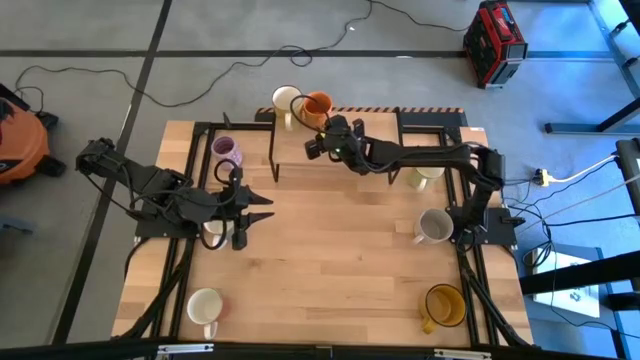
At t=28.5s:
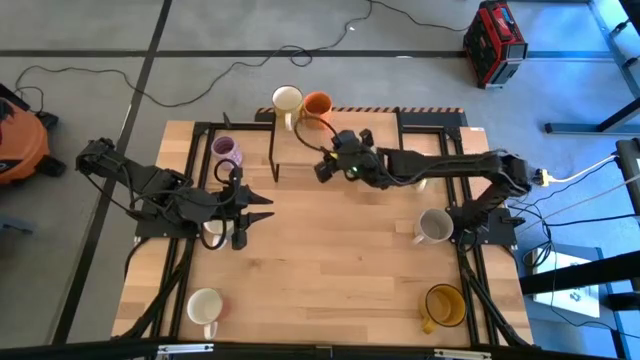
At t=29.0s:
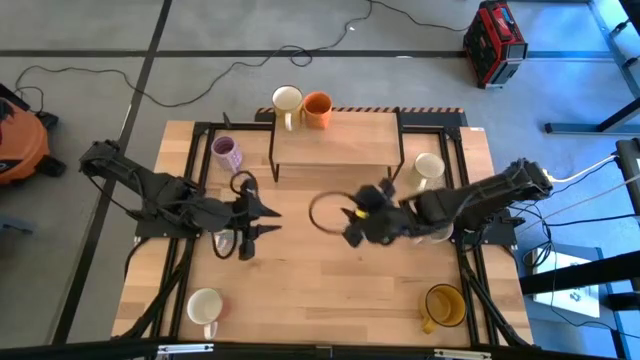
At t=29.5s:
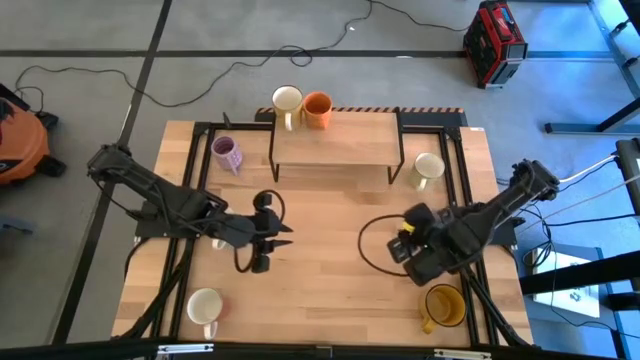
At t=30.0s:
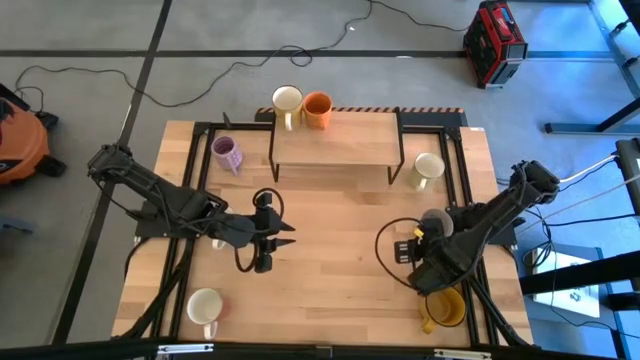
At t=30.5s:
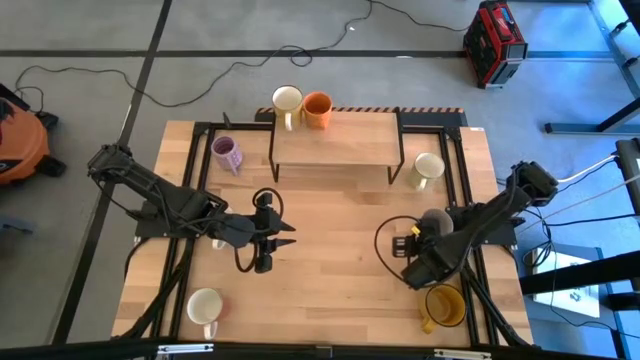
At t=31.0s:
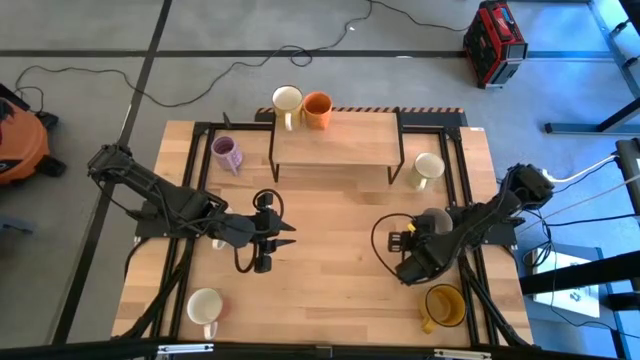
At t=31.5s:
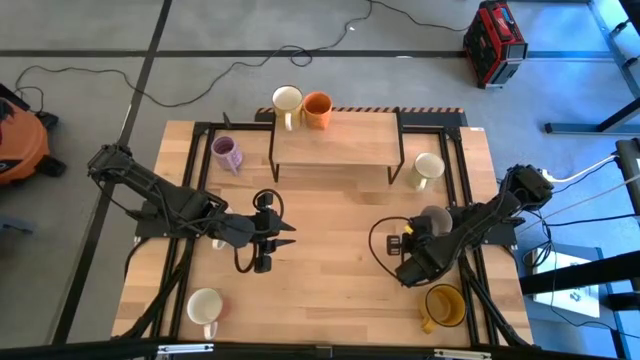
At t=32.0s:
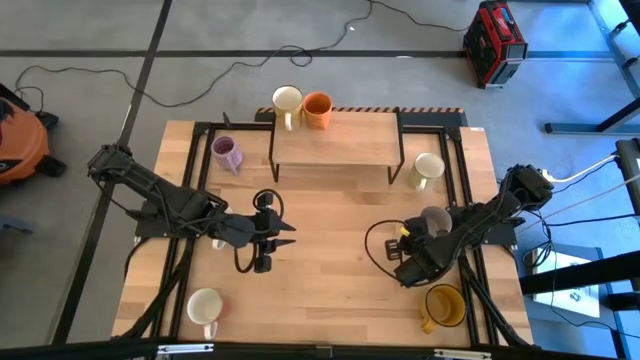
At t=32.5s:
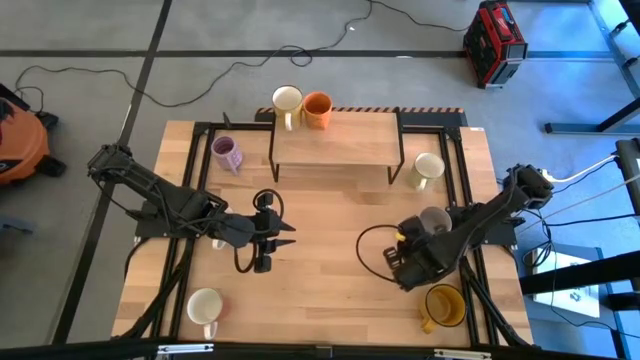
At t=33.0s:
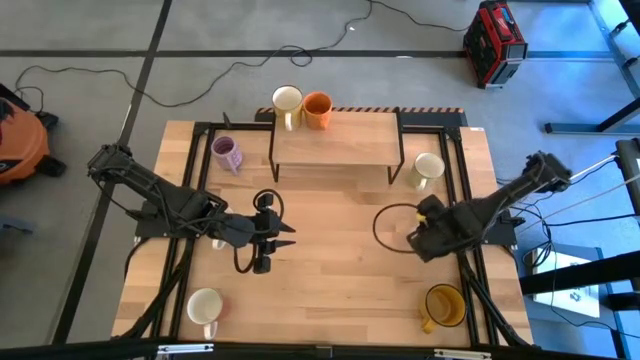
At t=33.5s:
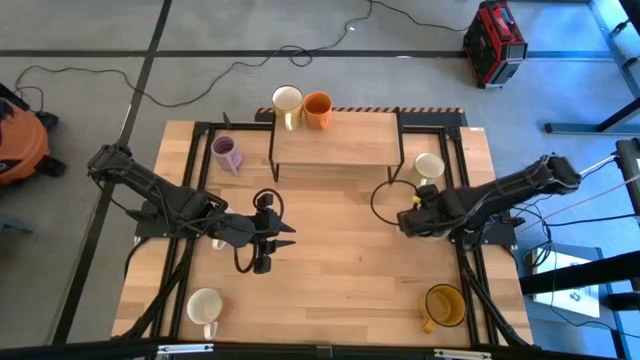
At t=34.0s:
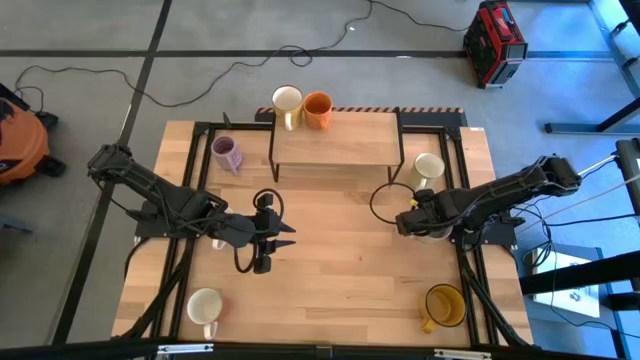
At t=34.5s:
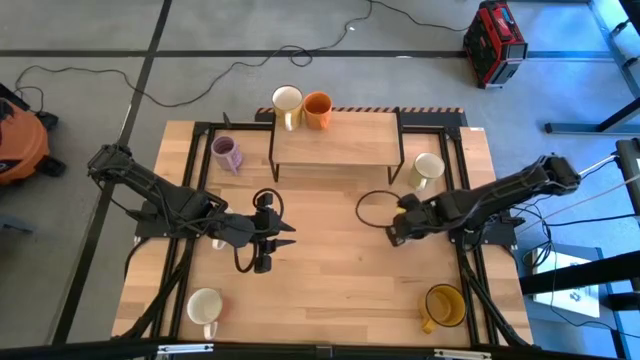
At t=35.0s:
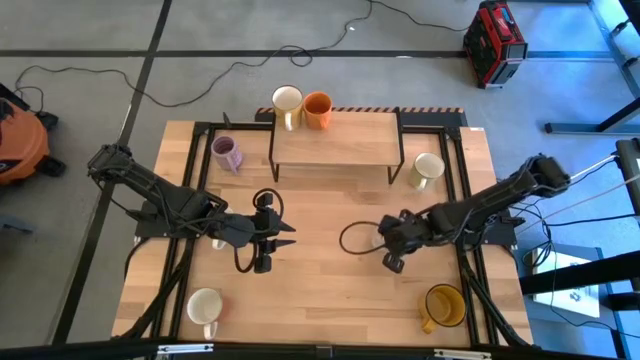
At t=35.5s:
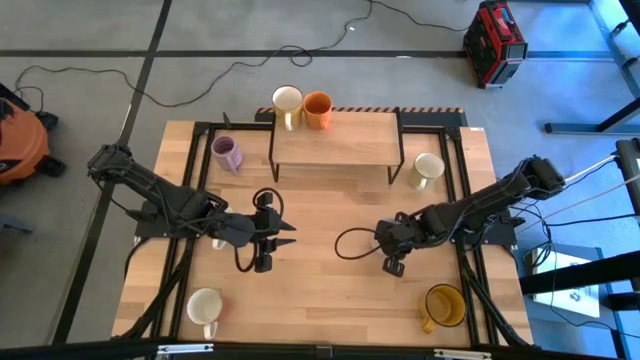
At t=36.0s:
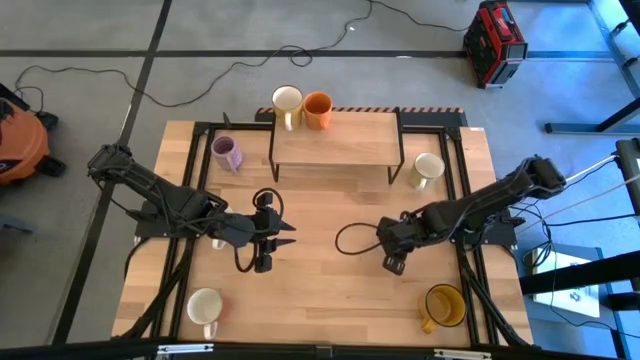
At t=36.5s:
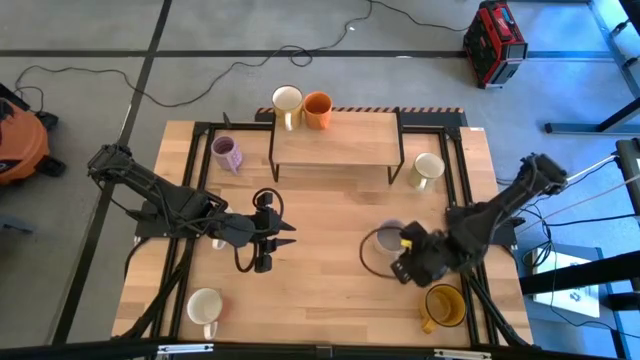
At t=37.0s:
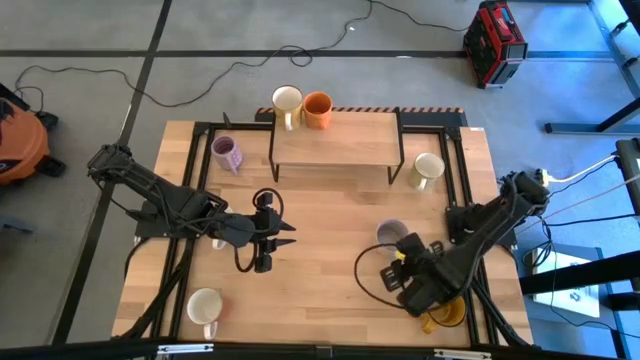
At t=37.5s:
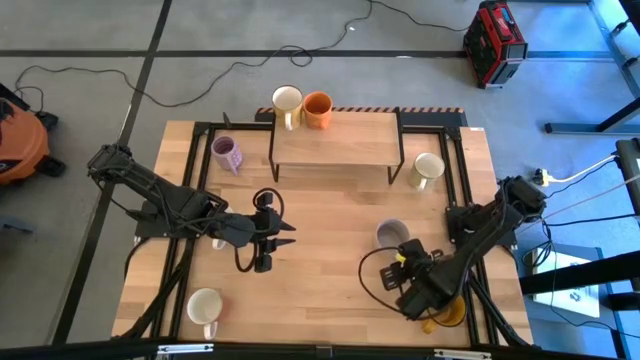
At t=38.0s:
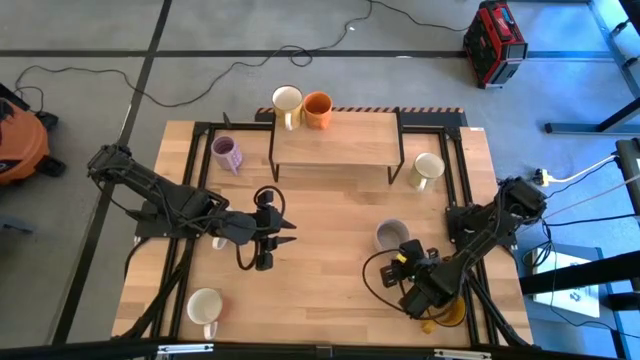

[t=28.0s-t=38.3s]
Task: Place coffee mugs
Put the gray mug on the shelf

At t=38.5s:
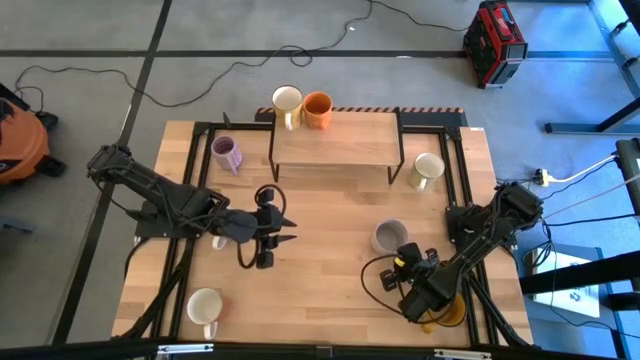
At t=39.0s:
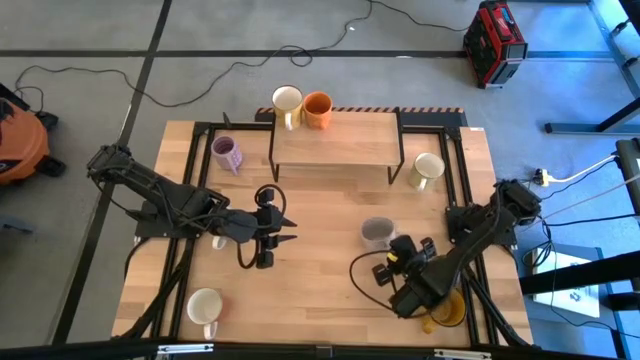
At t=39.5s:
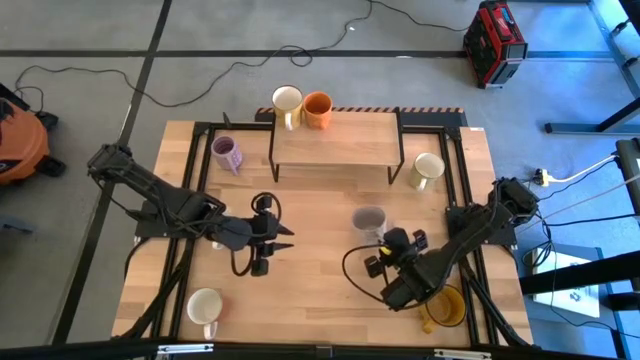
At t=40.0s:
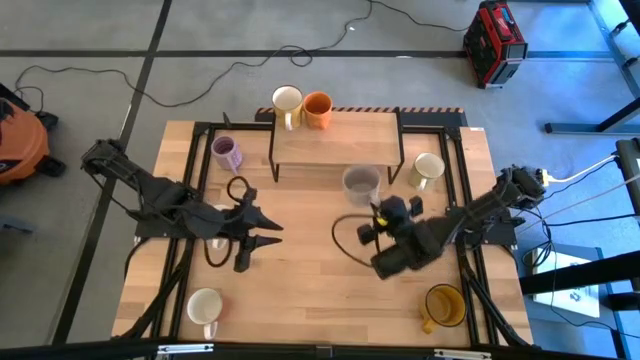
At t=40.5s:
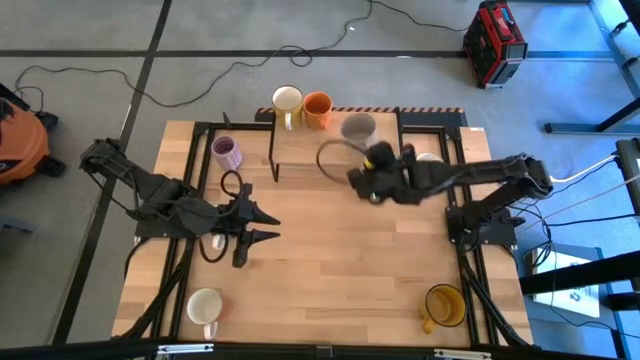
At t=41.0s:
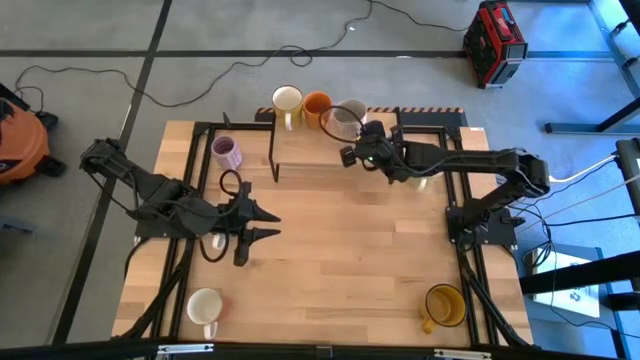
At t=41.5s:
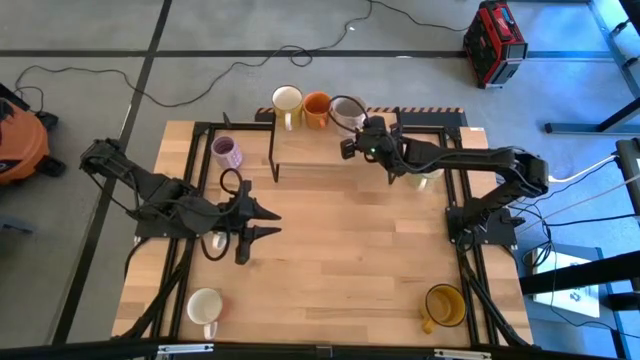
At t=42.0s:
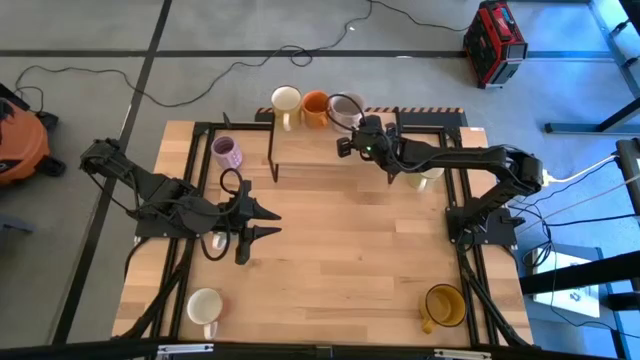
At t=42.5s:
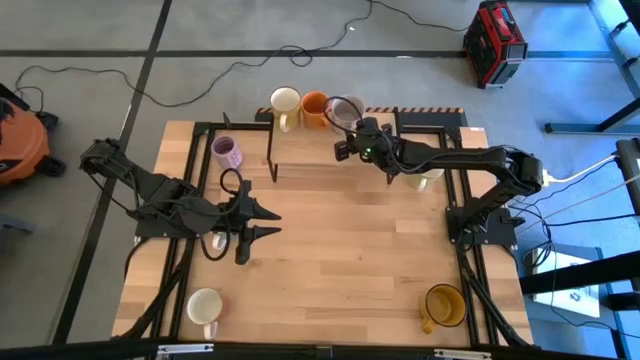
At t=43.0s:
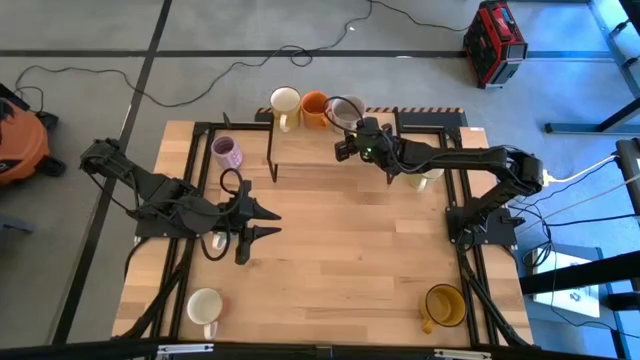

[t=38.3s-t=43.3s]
Put the gray mug on the shelf

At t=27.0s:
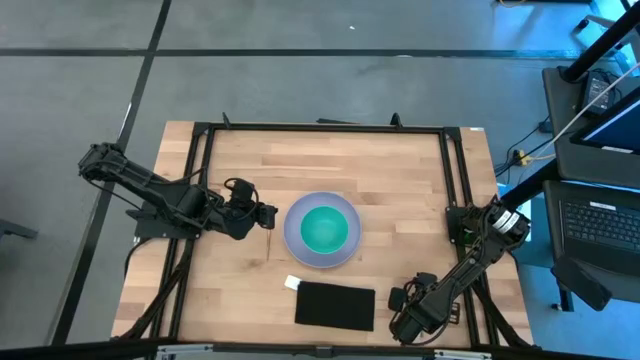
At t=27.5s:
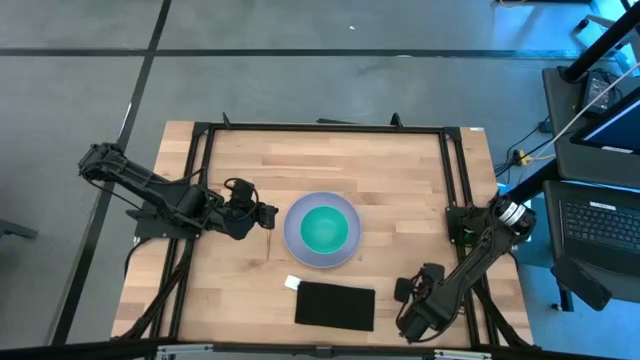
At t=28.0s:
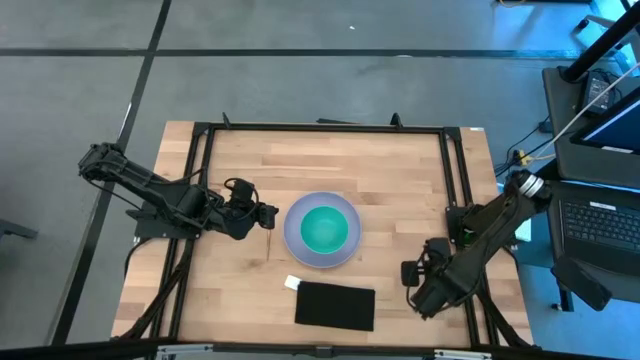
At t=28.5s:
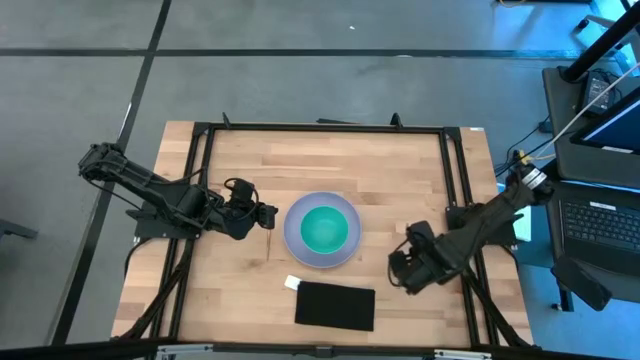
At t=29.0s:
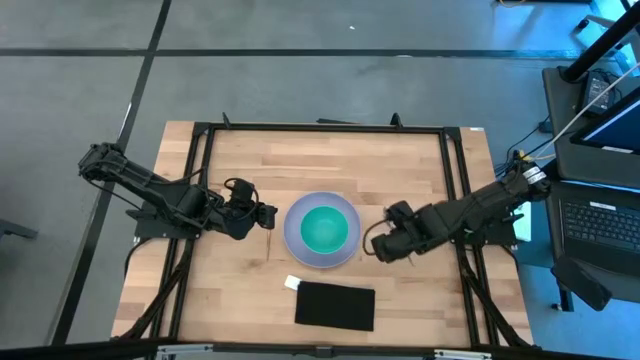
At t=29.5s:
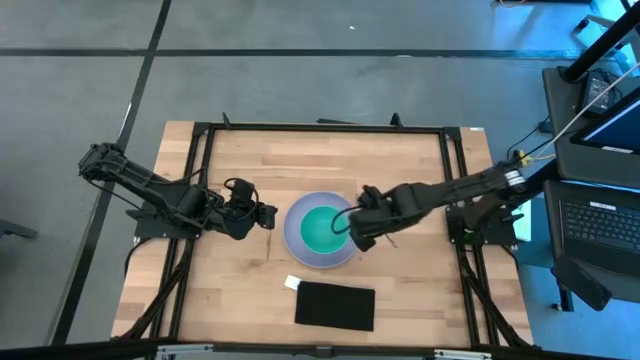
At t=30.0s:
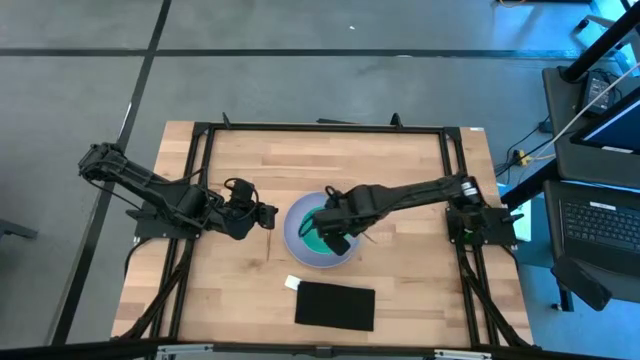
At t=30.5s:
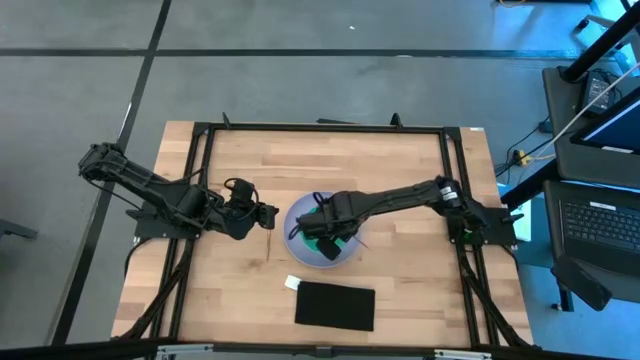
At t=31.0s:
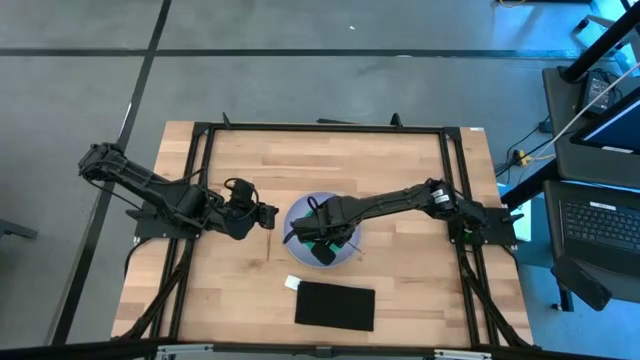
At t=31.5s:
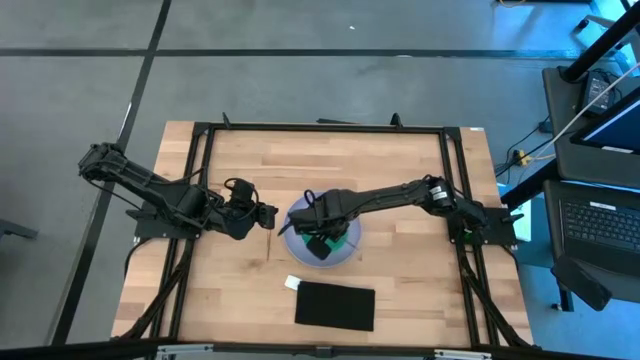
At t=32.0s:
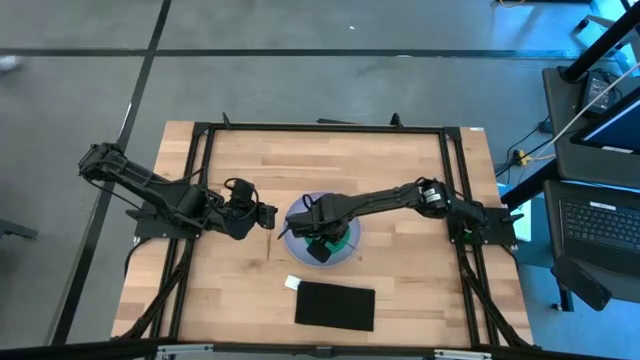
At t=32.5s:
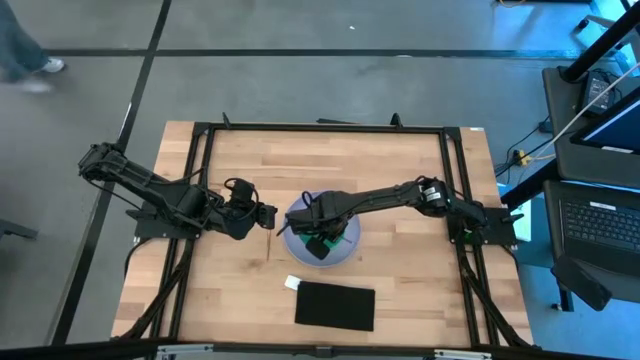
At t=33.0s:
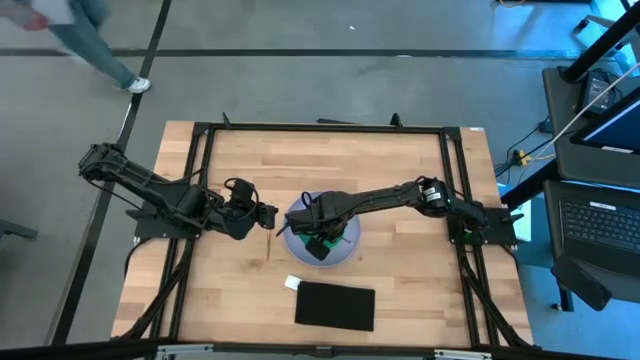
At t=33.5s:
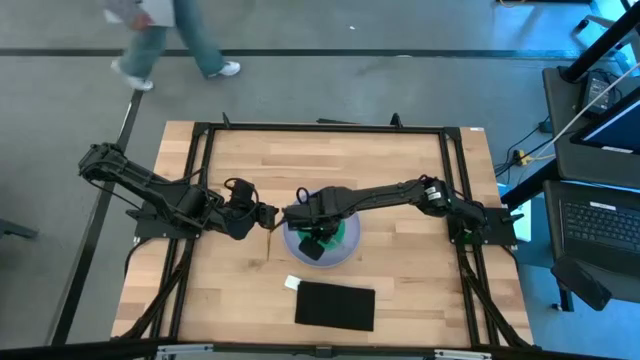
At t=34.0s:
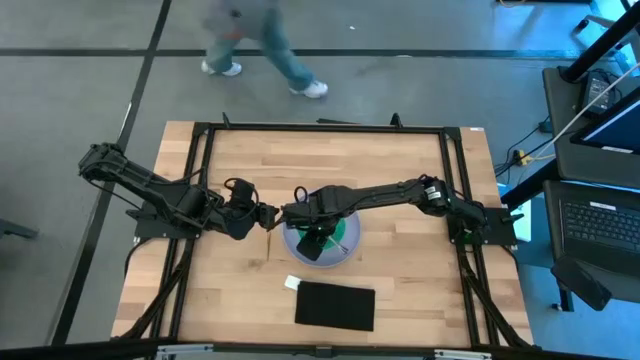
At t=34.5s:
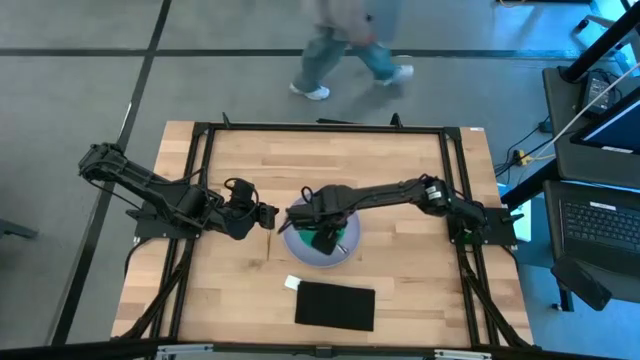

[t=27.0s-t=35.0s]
Task: Set table place
Place the silver spoon inside the green bowl
